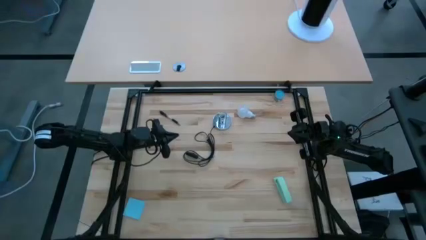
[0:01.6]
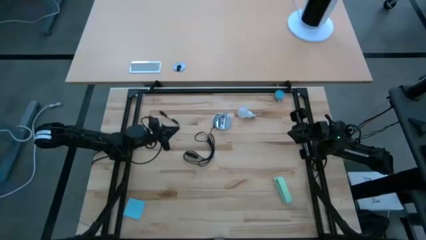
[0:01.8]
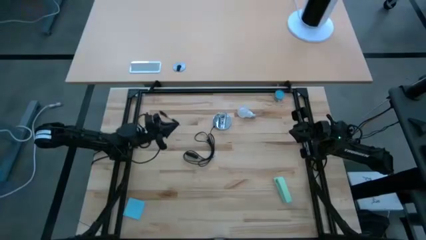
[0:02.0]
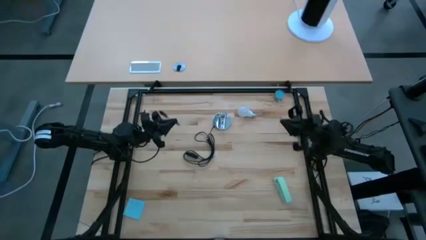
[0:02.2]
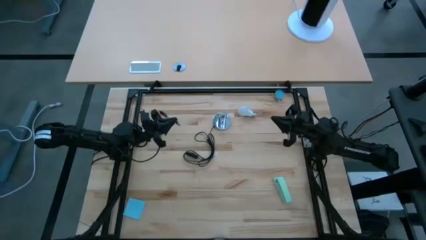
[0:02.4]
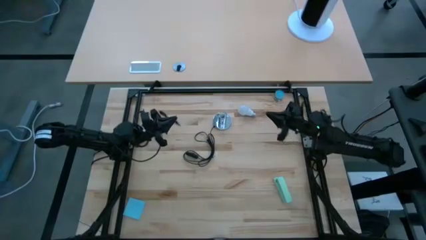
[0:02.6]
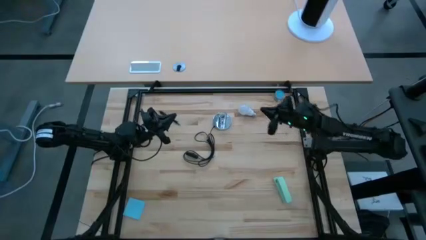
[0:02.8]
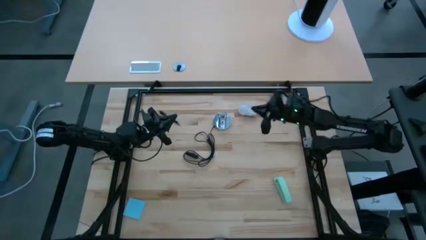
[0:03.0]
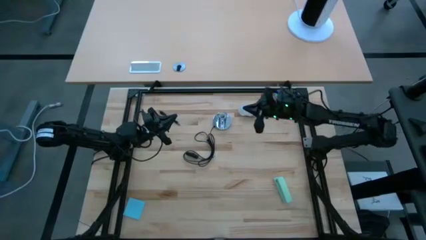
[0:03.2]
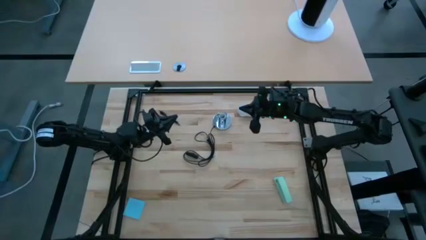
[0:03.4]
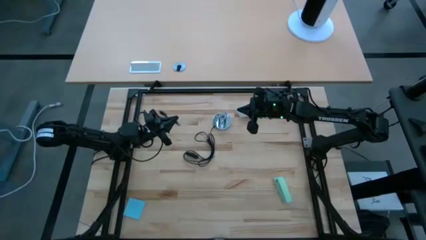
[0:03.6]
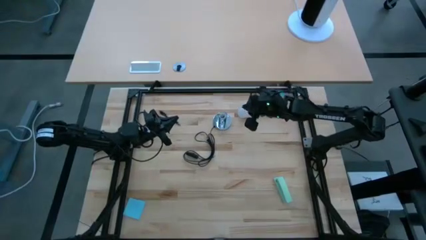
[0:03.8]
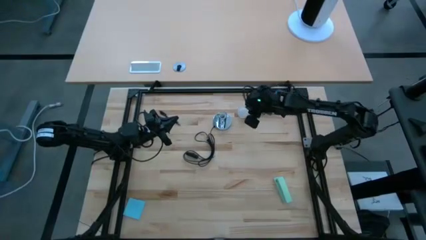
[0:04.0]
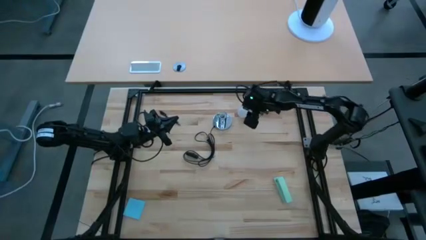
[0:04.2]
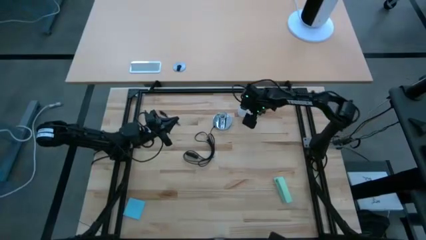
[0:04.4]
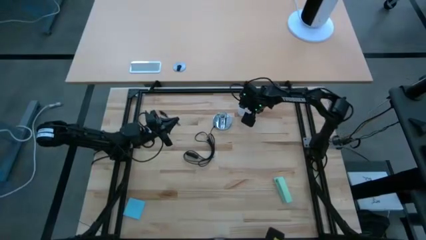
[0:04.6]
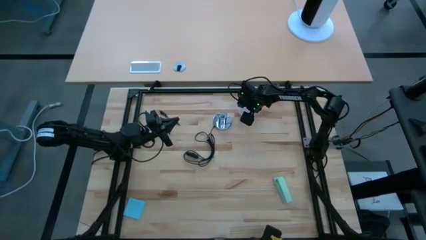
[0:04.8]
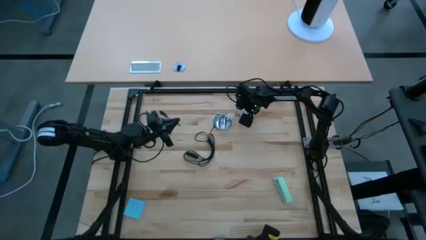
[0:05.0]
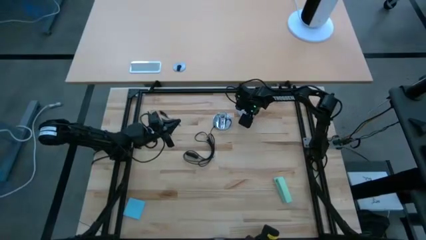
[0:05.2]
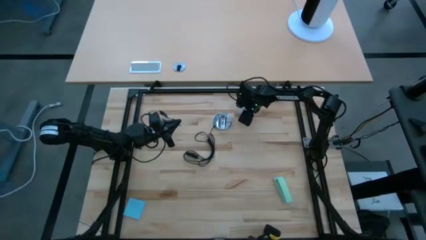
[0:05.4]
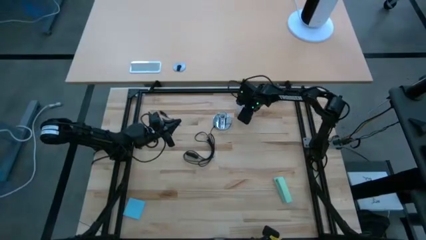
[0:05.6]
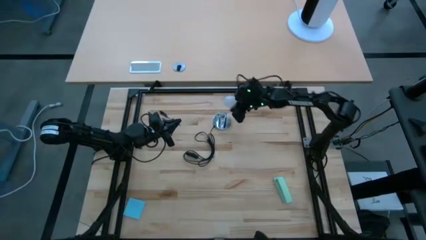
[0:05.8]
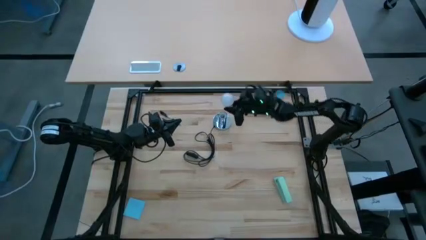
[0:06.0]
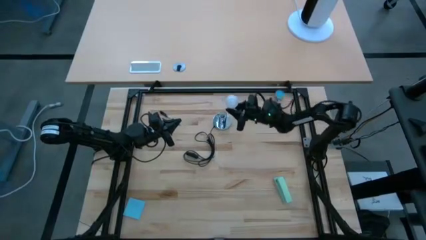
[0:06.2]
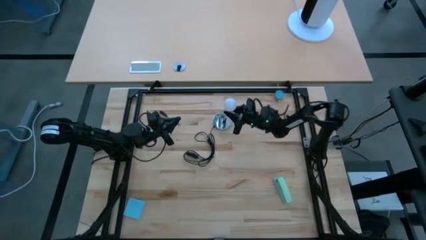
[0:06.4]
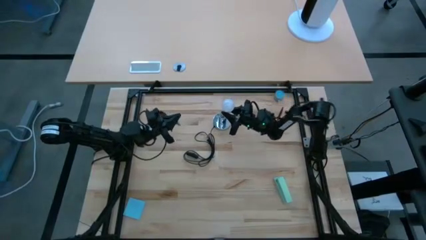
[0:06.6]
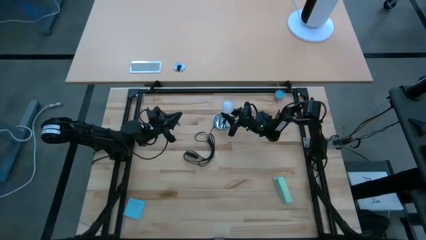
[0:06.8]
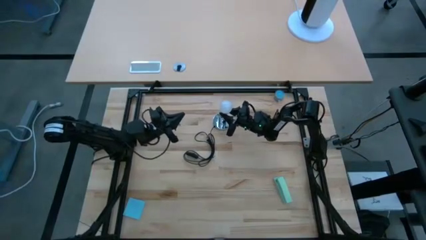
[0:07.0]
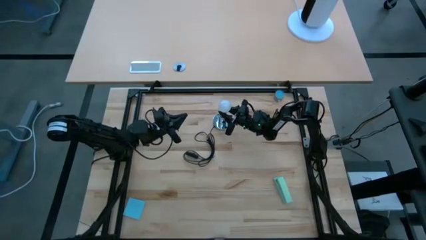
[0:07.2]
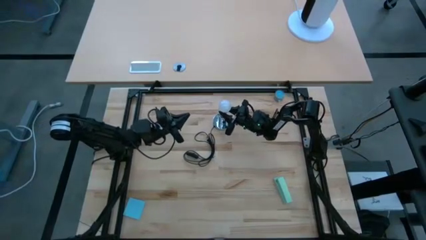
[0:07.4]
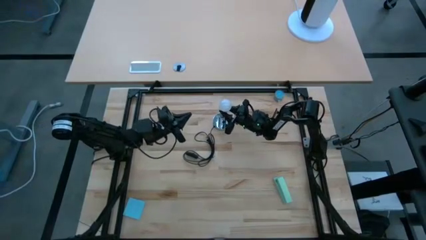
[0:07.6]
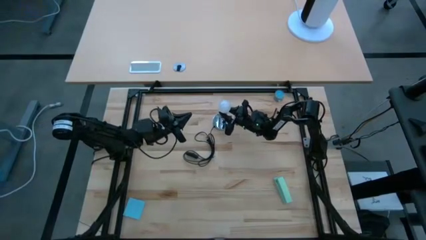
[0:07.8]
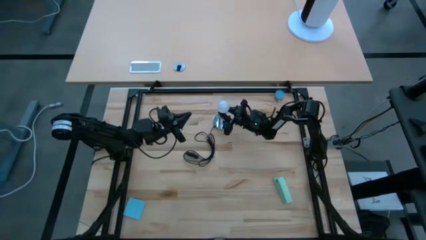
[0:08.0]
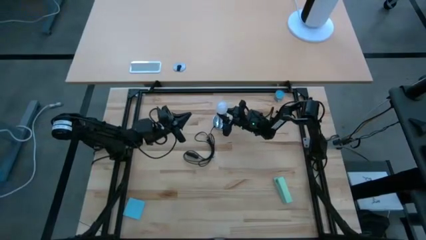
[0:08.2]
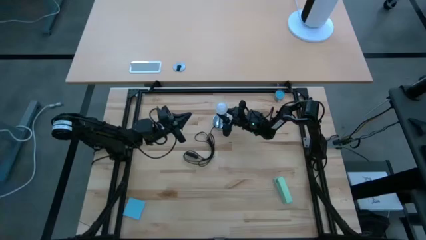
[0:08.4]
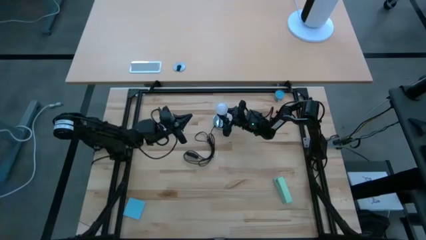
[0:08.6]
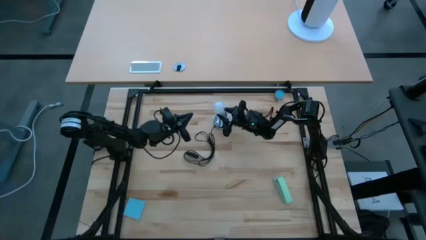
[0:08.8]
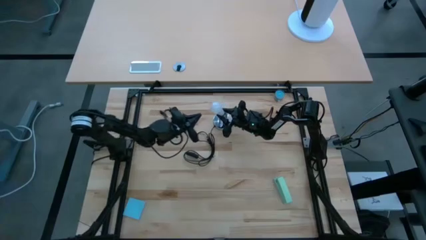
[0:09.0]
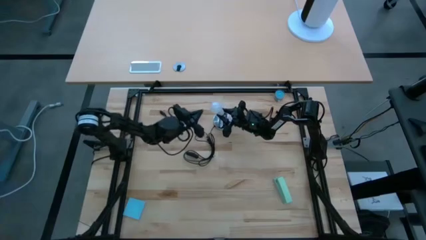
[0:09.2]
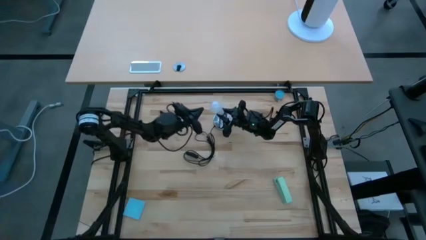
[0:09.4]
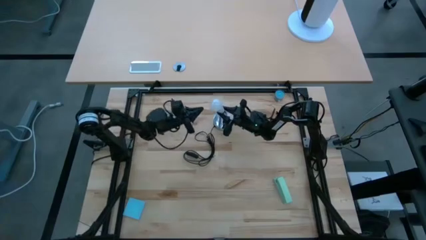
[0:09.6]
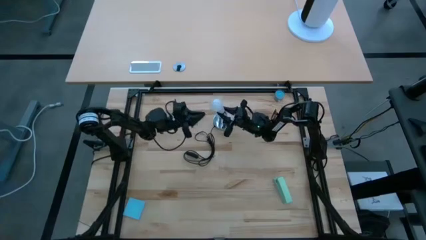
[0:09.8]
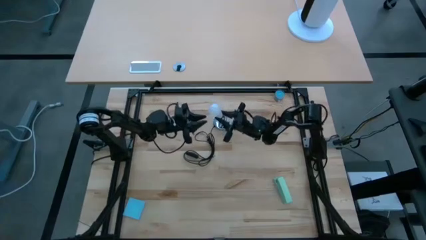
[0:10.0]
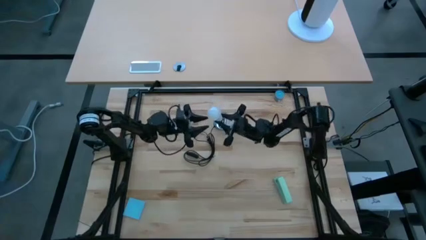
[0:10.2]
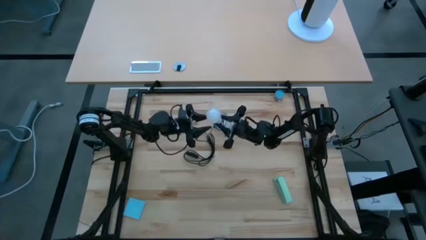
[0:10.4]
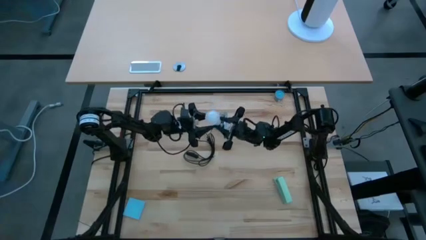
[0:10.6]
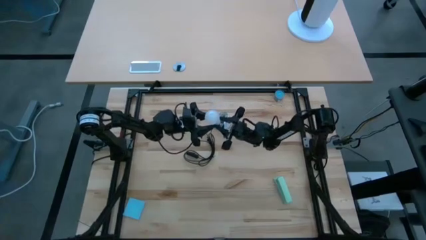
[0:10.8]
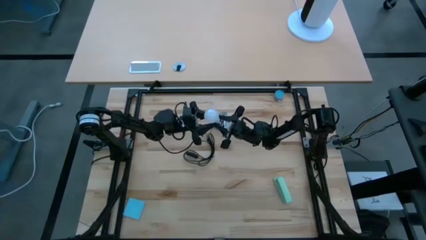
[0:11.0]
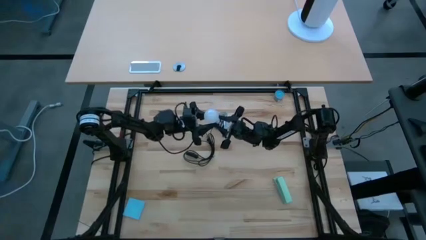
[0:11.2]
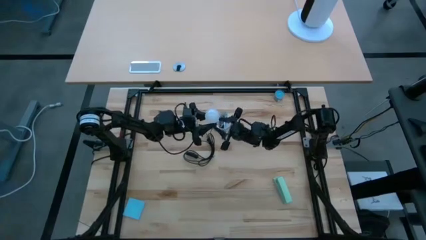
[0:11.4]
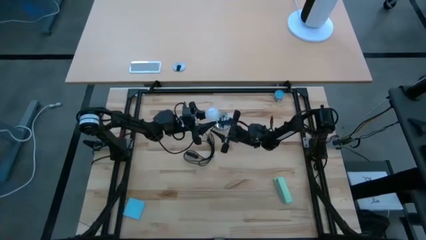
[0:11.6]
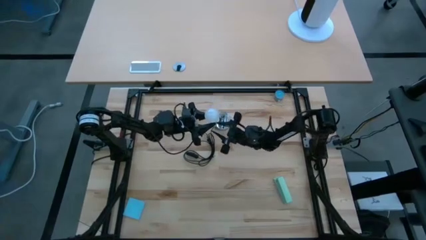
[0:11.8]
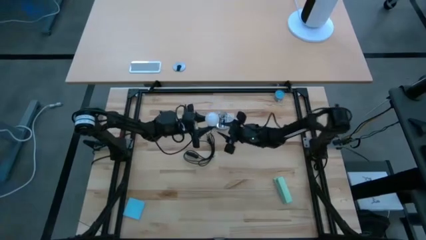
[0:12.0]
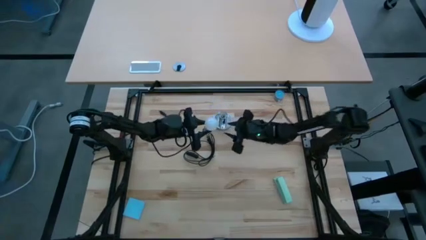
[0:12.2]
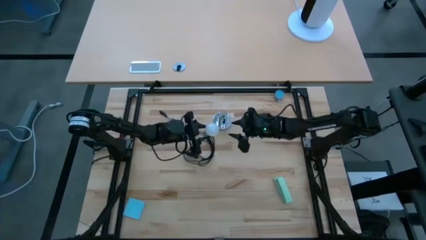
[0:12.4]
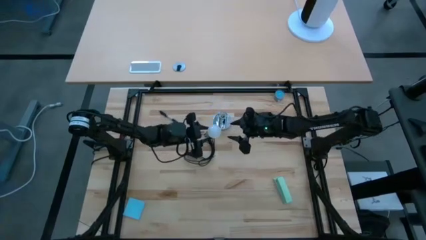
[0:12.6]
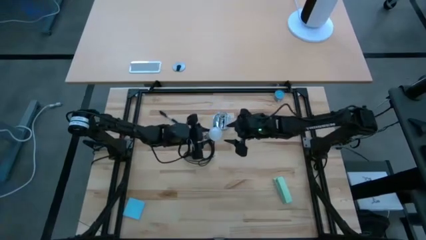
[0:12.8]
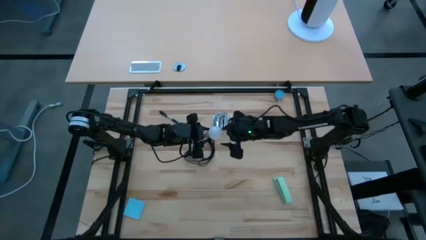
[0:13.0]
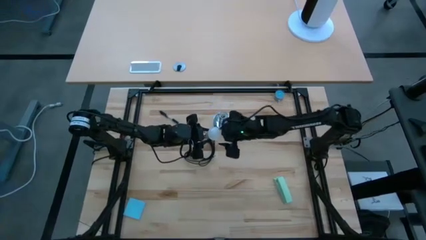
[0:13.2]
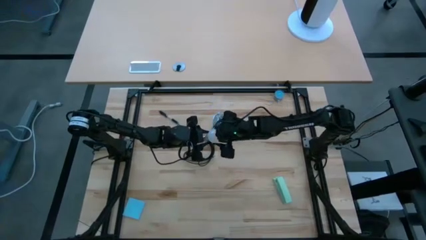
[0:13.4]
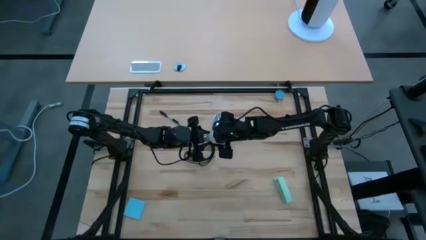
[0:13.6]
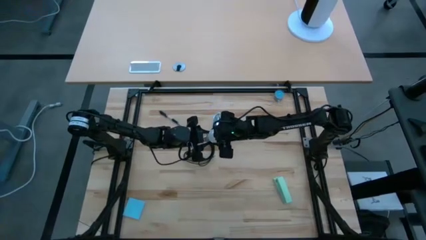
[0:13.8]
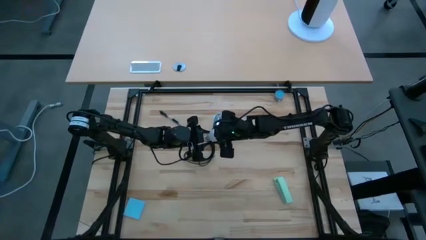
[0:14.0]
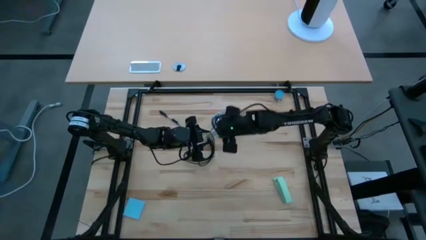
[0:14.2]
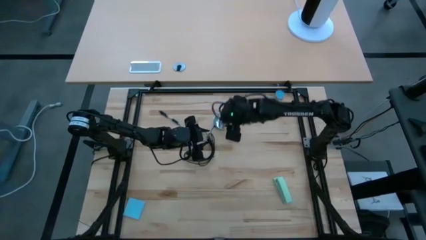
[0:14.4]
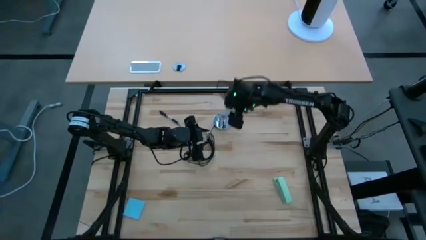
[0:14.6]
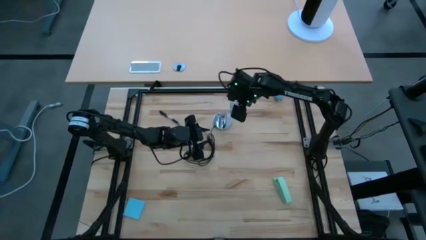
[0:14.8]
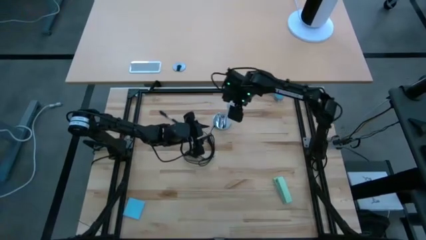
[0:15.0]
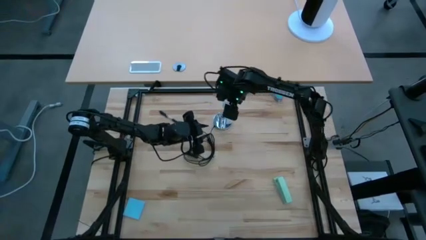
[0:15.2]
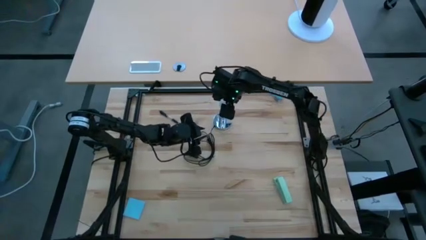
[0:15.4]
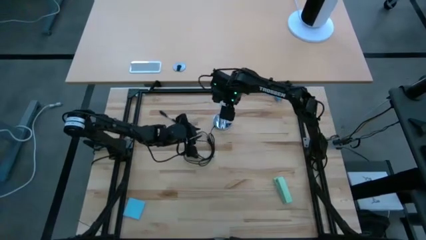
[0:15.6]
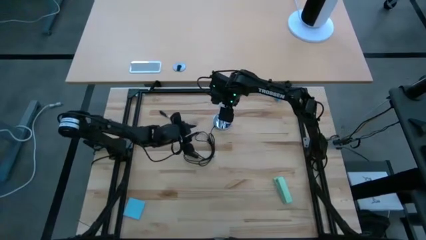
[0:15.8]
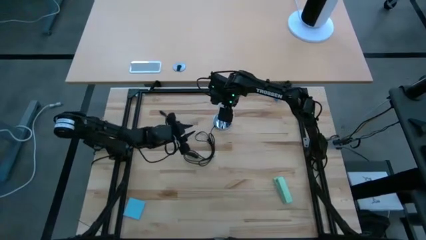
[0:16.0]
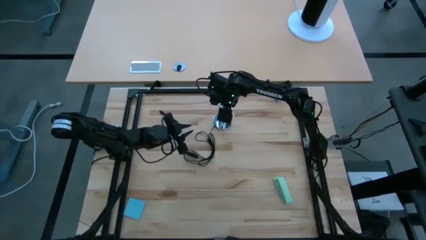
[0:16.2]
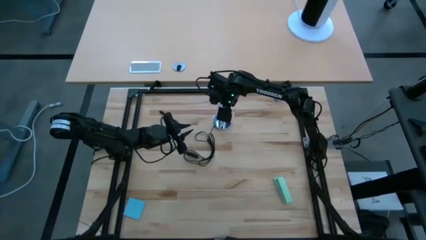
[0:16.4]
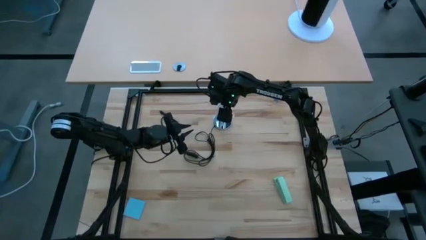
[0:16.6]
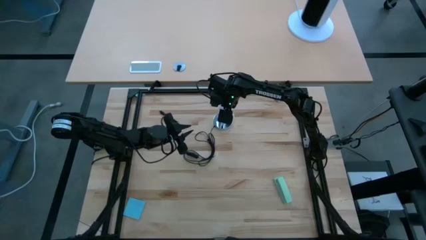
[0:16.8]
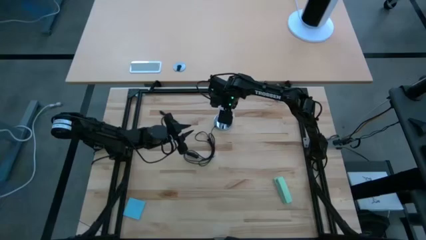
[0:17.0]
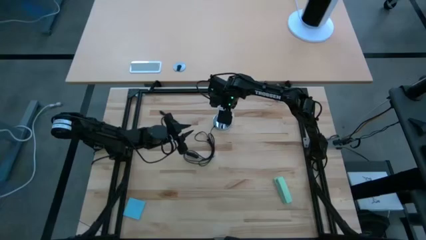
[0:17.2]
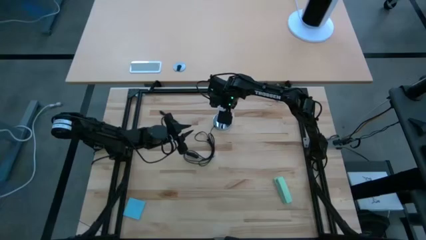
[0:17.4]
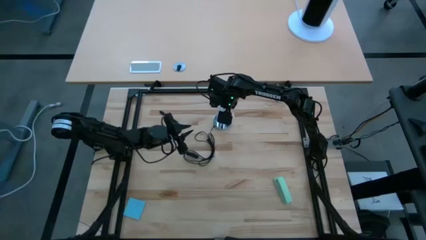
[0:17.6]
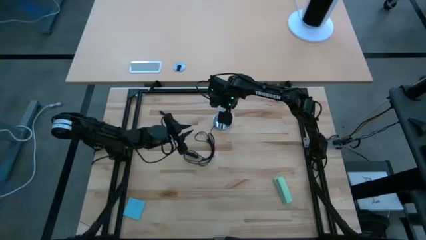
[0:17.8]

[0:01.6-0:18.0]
Task: Screw lightbulb
Insert the lightbulb into the lamp
